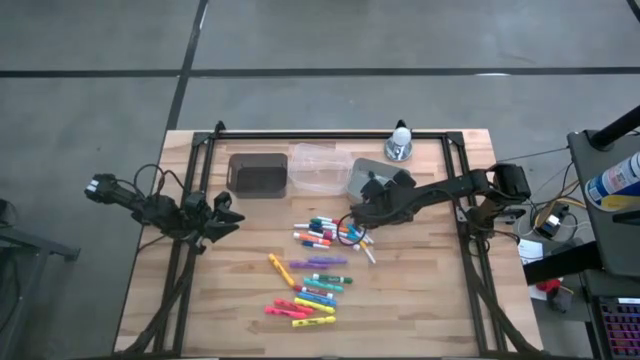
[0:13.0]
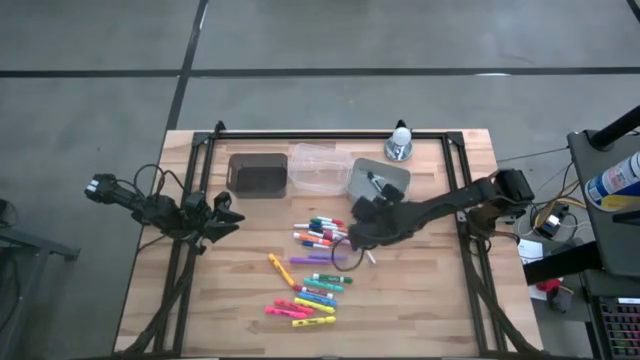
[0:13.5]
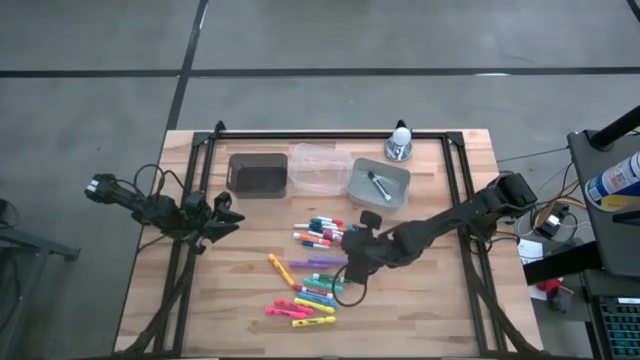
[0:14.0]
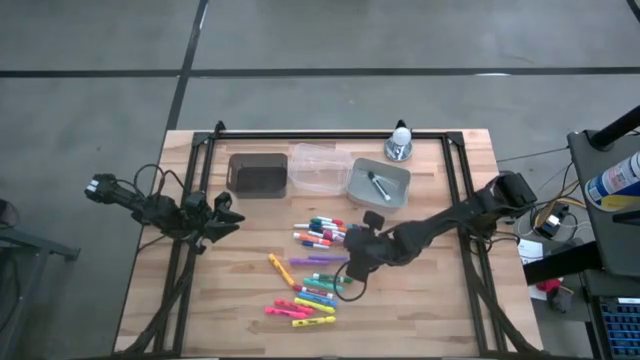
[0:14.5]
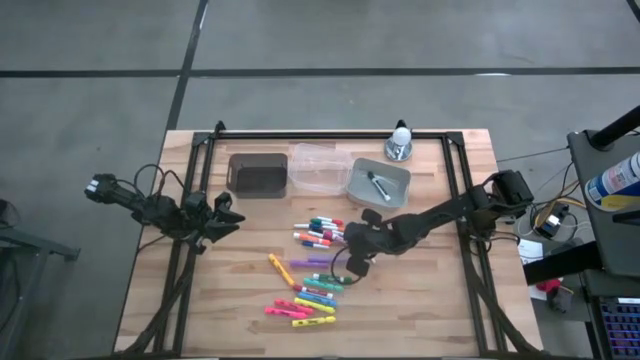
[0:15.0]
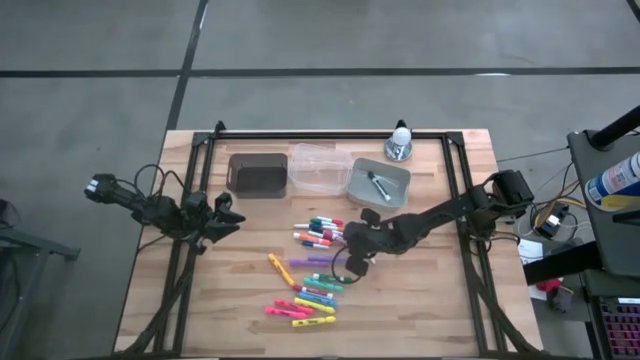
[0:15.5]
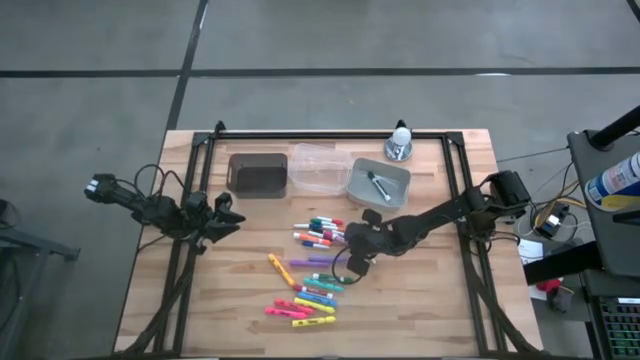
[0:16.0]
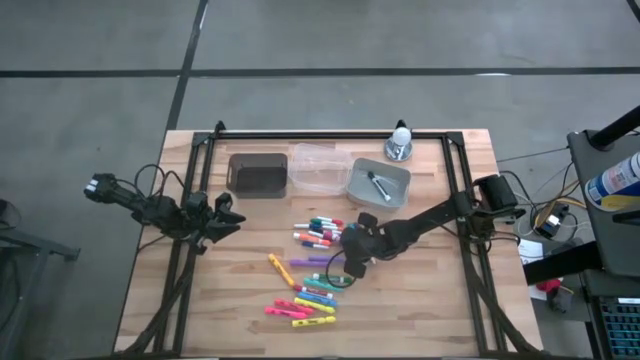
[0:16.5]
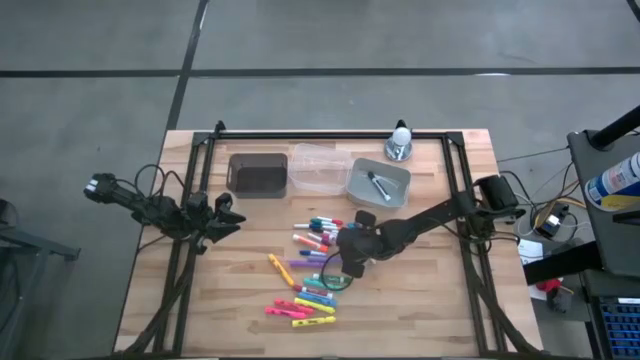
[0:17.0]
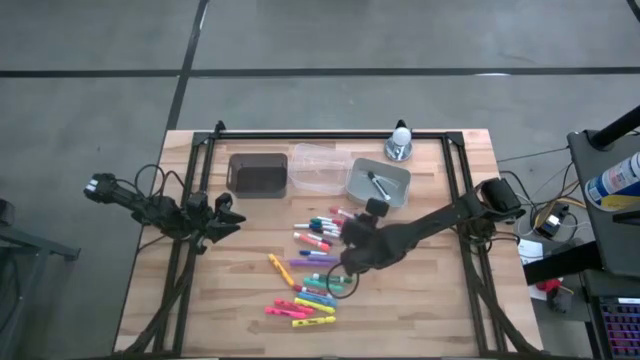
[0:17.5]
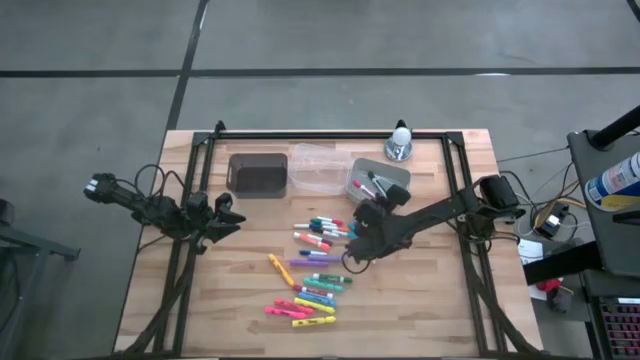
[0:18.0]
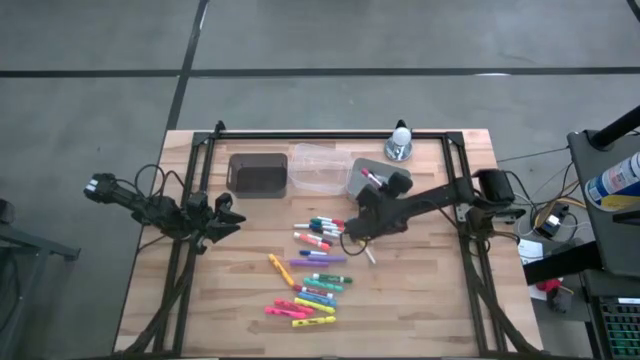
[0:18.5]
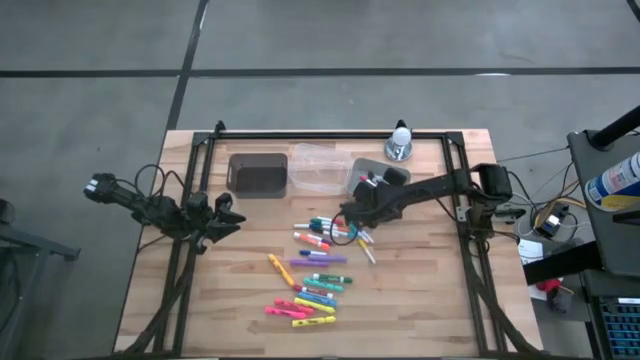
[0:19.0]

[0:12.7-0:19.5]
Task: Pick & Place Markers
Put the pink dry erase marker into the gray bin

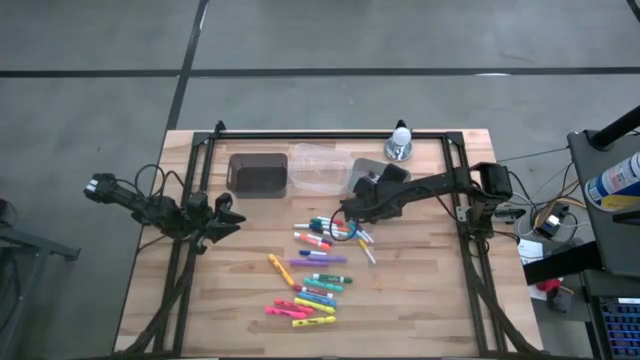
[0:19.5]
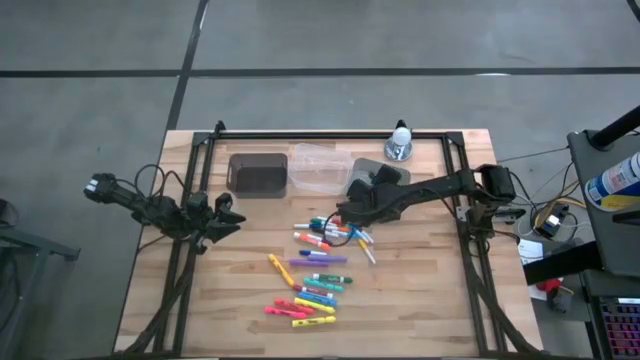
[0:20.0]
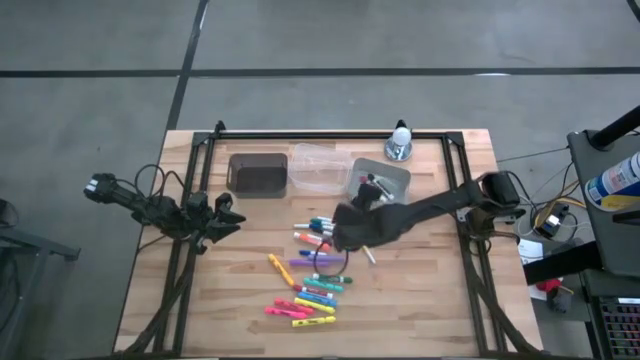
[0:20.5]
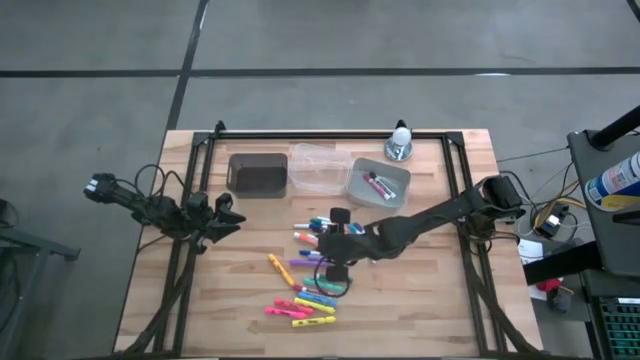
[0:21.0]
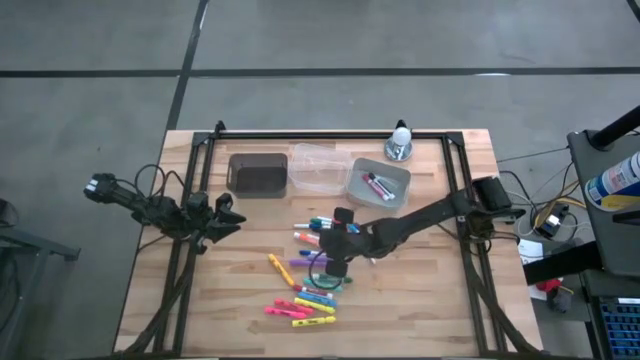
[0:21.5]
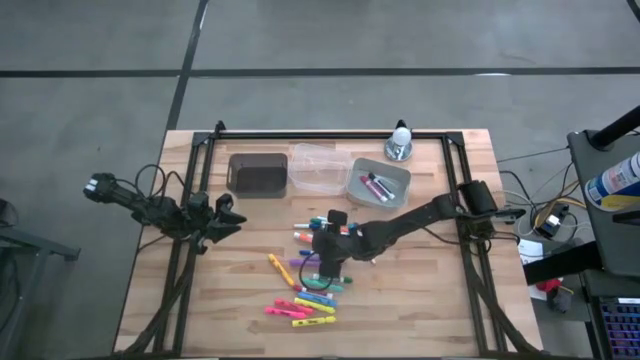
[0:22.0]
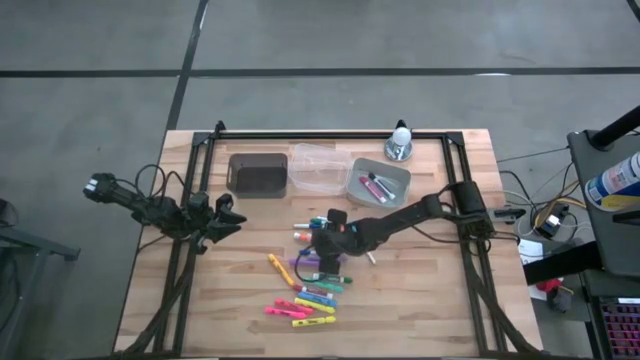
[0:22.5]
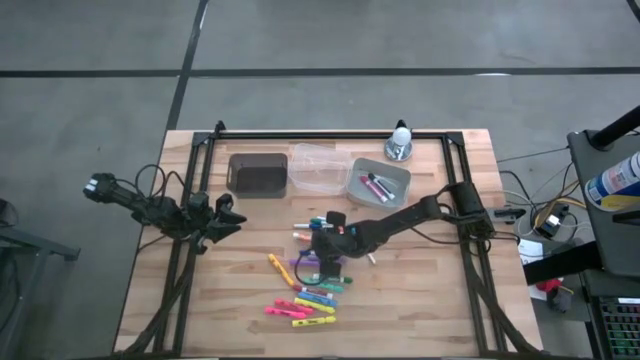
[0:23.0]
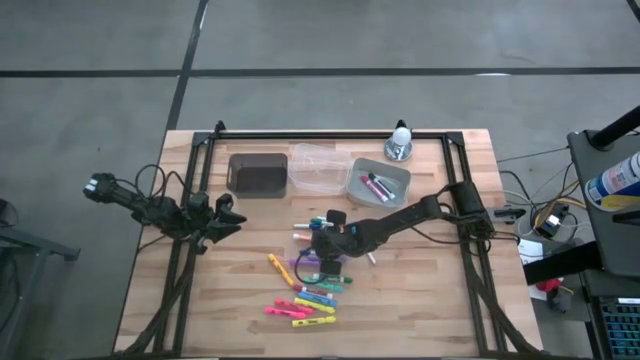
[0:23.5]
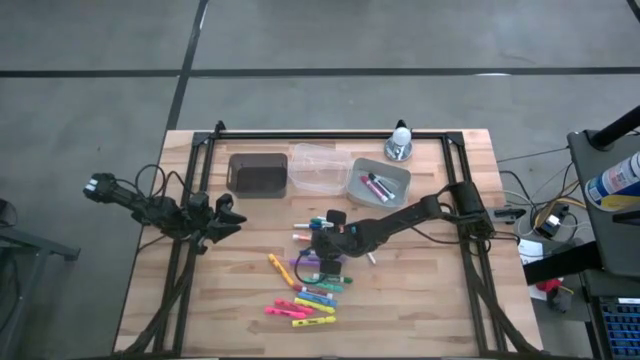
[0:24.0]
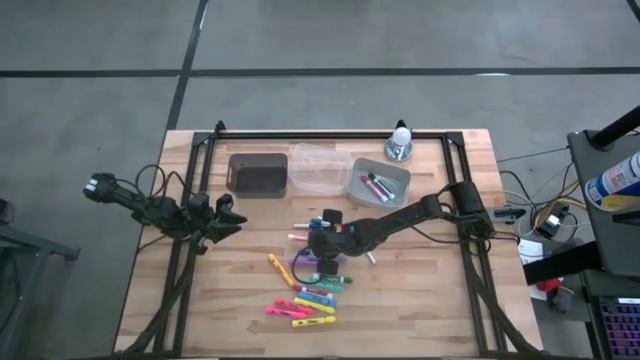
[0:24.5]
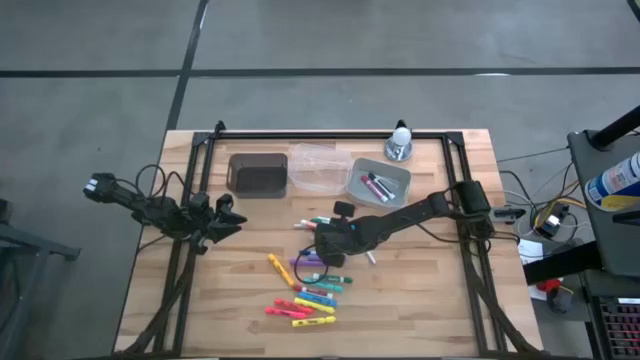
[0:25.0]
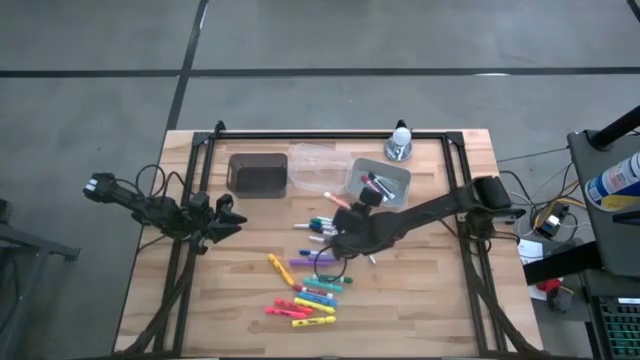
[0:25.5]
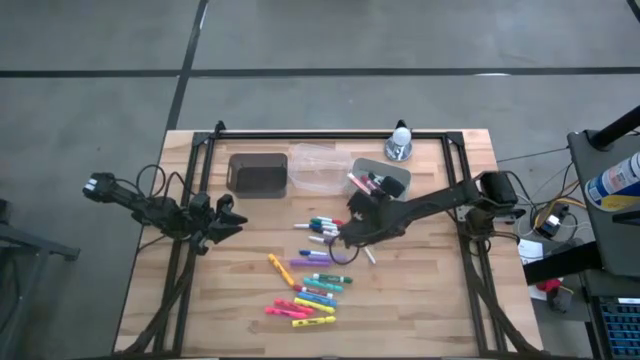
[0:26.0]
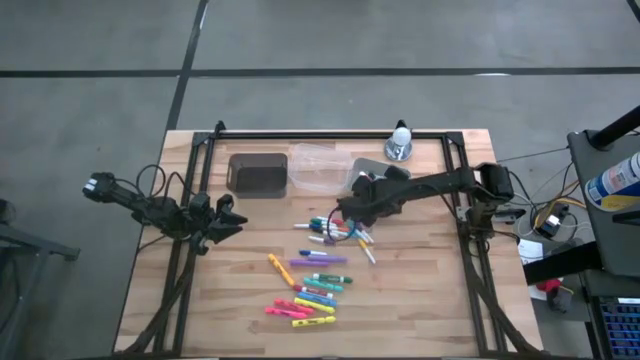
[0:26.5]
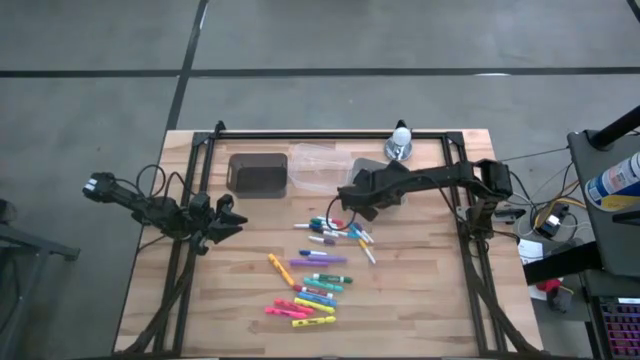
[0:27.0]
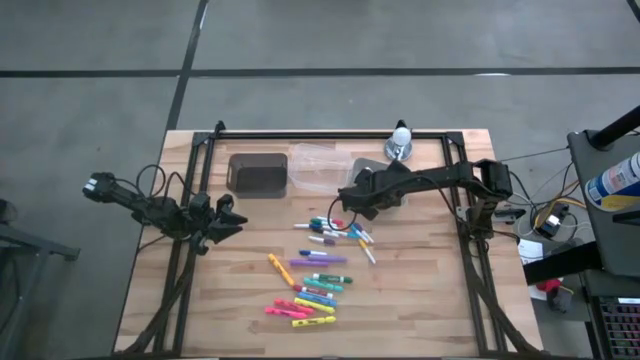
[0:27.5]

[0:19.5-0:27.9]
Put the orange dry erase marker into the gray bin

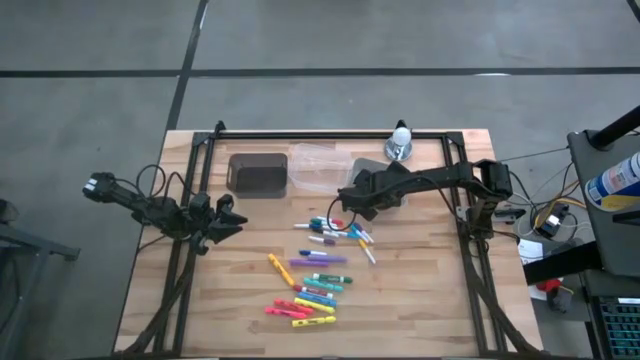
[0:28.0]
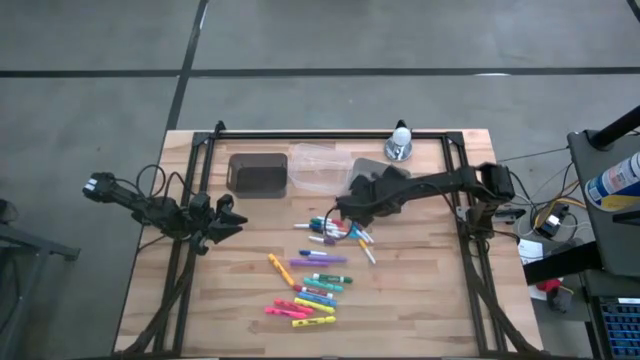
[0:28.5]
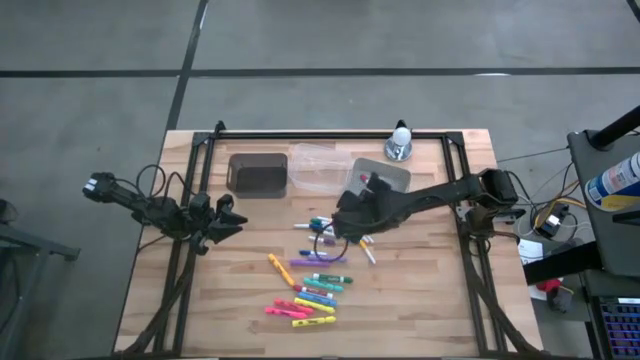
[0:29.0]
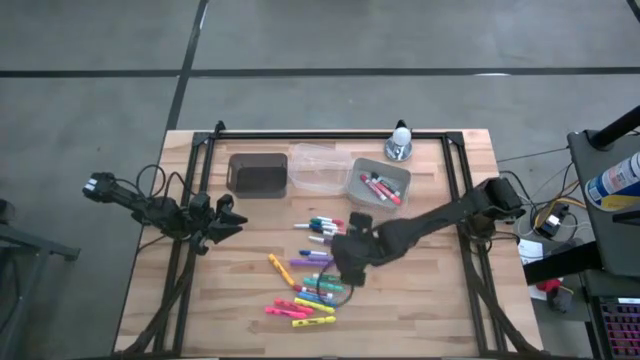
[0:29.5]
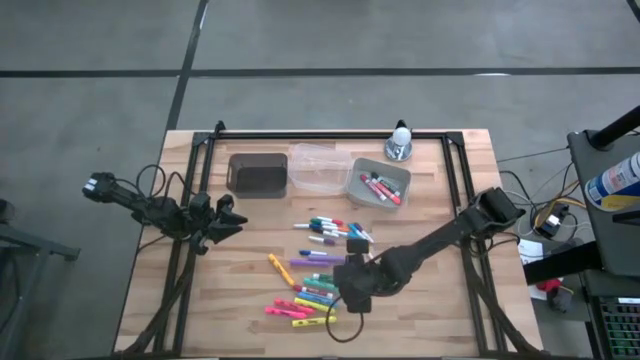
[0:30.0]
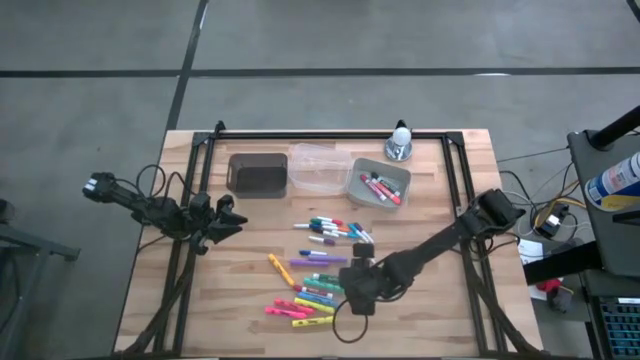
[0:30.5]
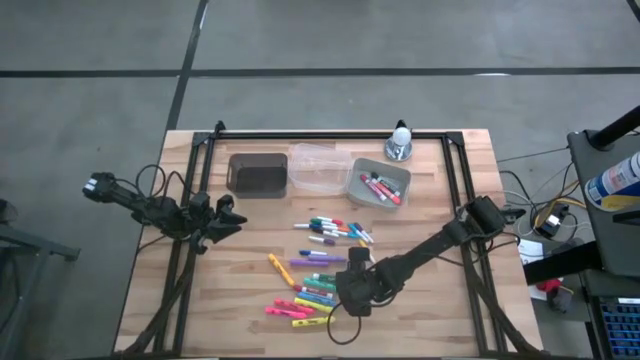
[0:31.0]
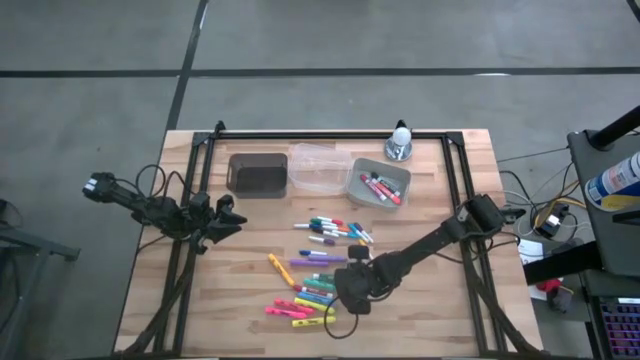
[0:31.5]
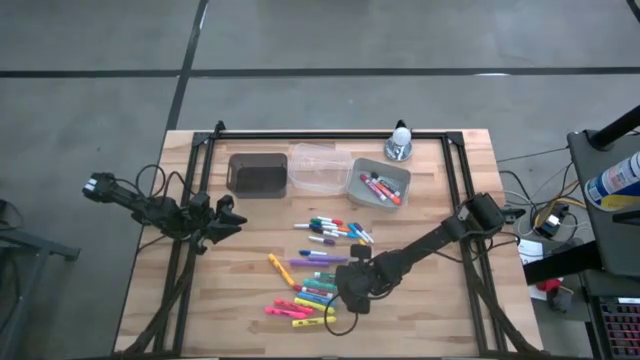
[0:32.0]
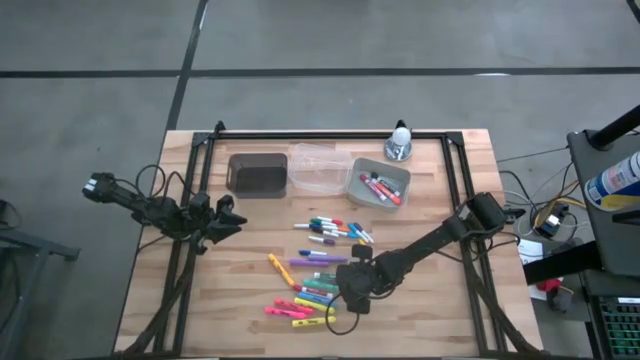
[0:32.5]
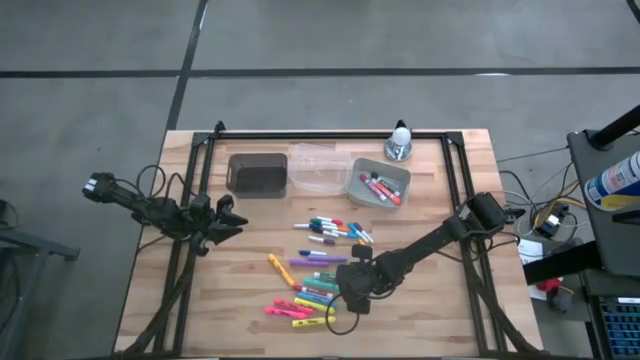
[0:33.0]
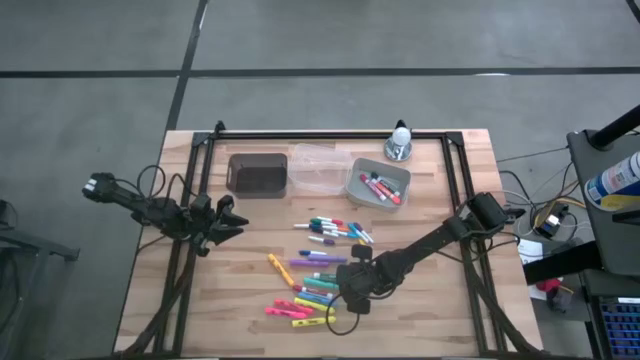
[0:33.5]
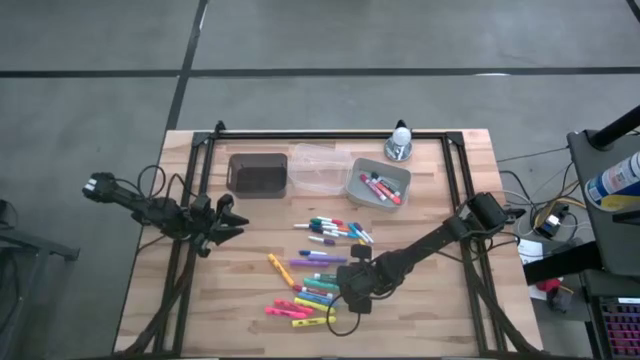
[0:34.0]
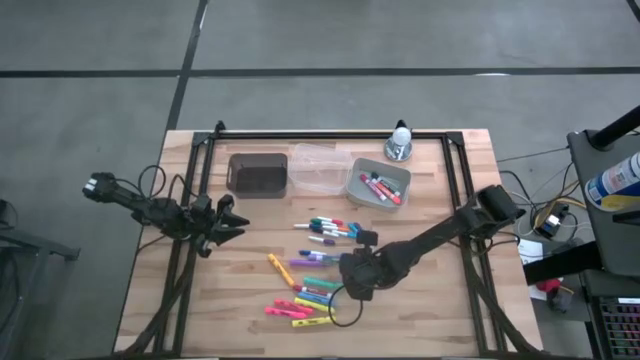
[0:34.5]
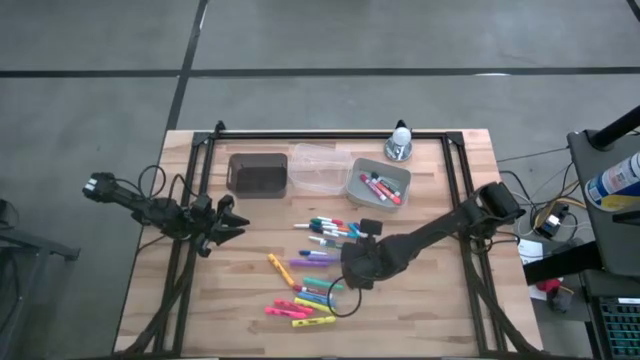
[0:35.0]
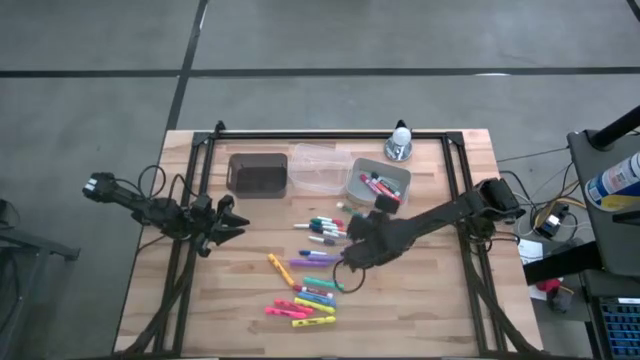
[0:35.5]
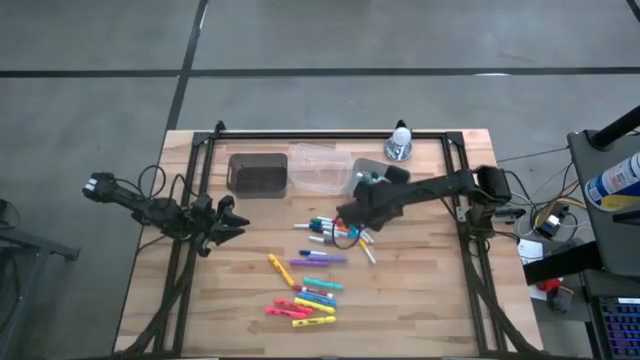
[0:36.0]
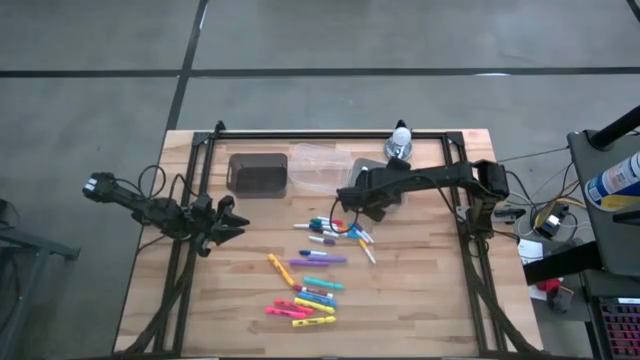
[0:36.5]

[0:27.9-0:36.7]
Put the green dry erase marker into the gray bin
